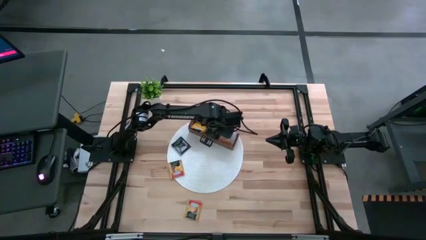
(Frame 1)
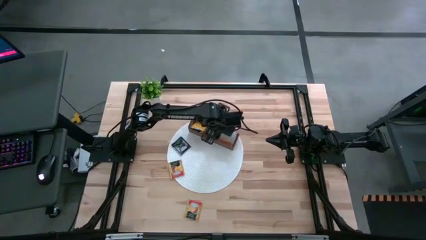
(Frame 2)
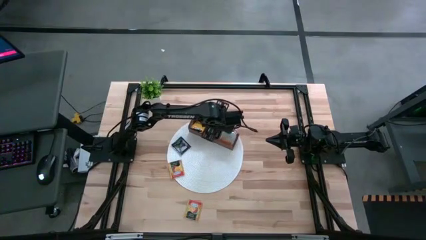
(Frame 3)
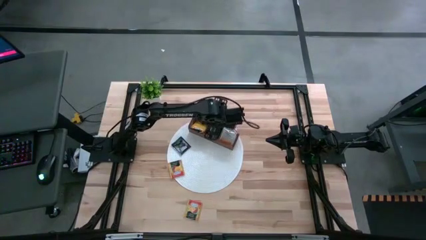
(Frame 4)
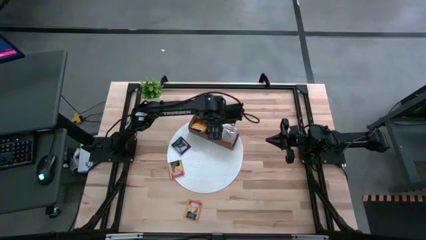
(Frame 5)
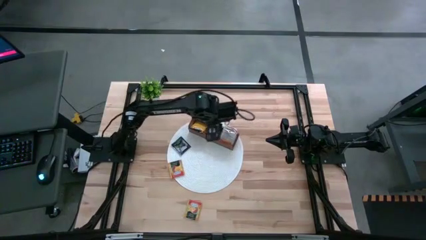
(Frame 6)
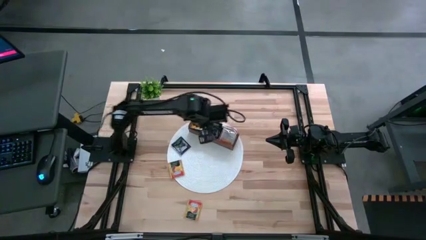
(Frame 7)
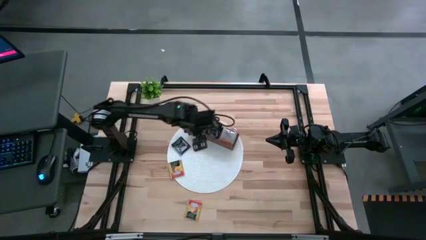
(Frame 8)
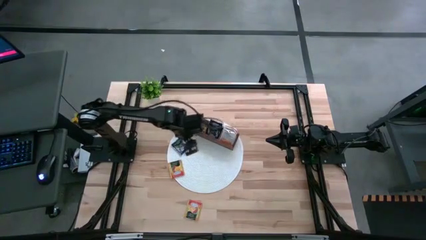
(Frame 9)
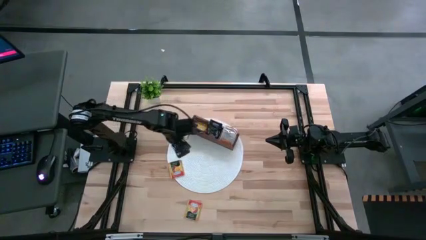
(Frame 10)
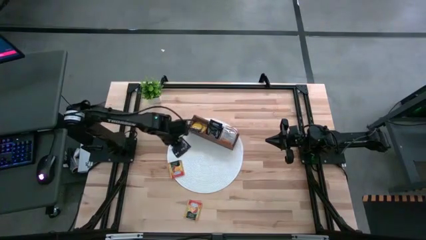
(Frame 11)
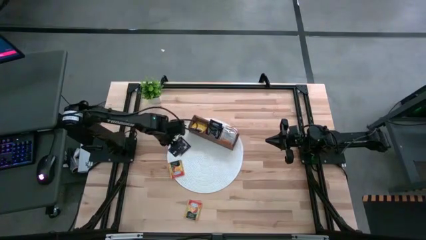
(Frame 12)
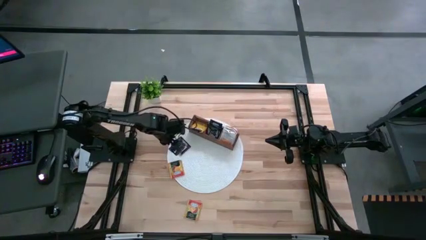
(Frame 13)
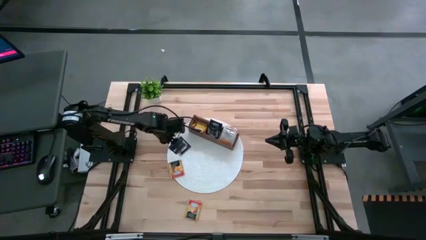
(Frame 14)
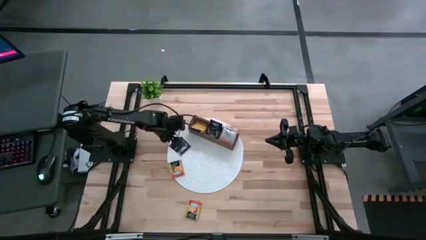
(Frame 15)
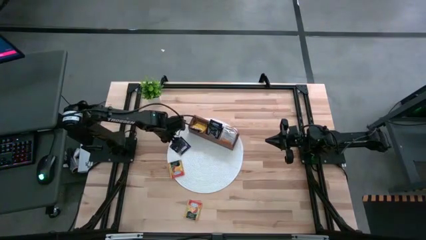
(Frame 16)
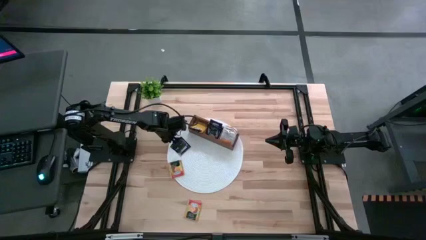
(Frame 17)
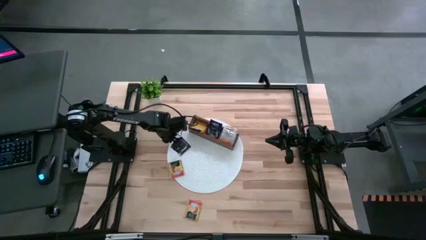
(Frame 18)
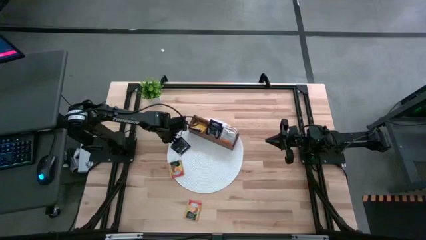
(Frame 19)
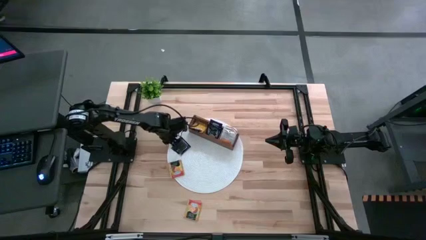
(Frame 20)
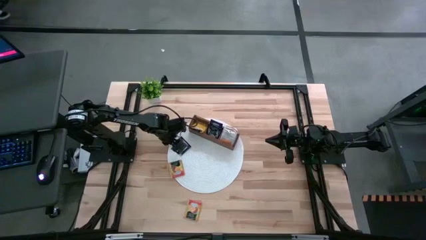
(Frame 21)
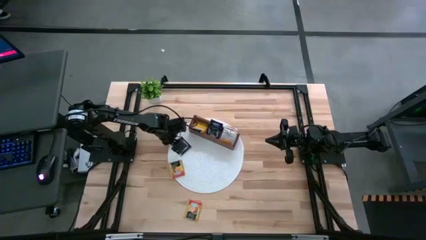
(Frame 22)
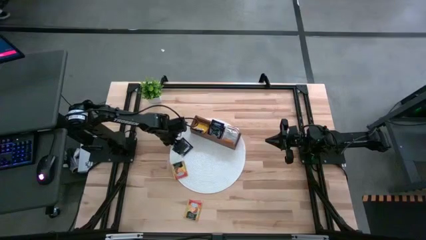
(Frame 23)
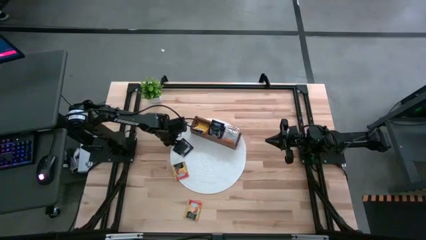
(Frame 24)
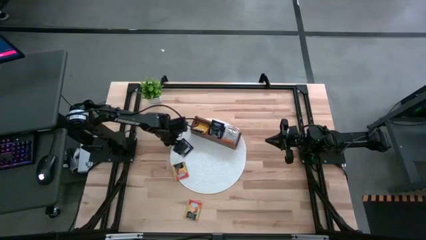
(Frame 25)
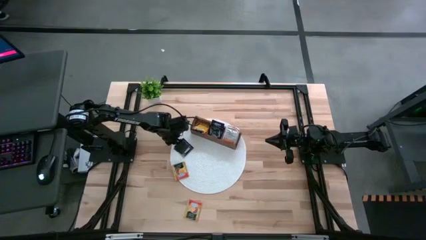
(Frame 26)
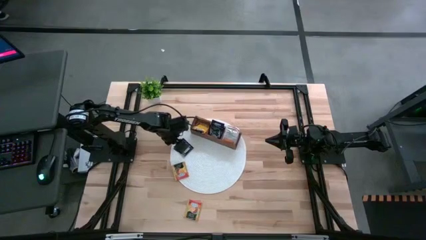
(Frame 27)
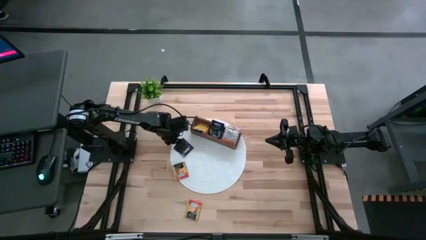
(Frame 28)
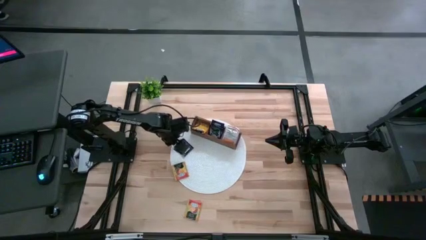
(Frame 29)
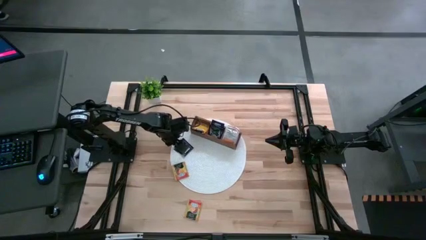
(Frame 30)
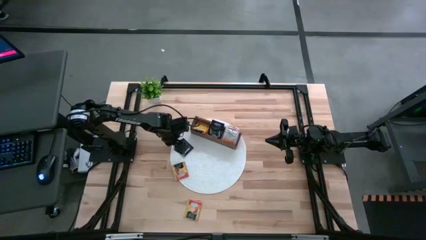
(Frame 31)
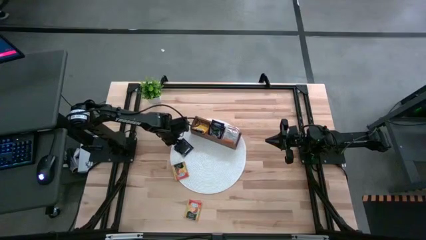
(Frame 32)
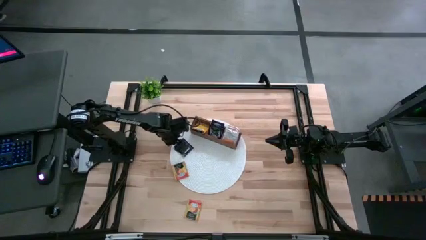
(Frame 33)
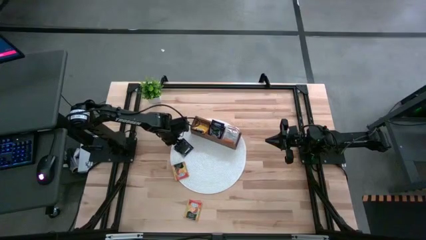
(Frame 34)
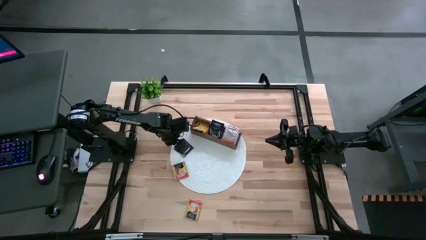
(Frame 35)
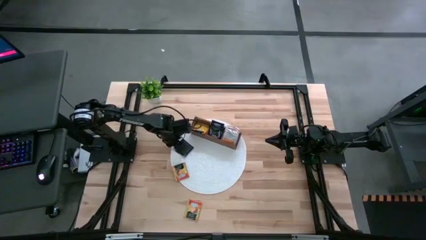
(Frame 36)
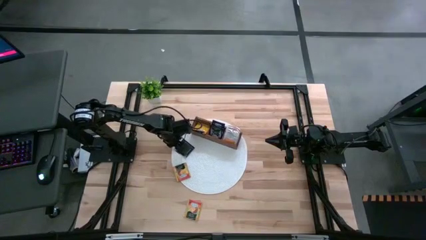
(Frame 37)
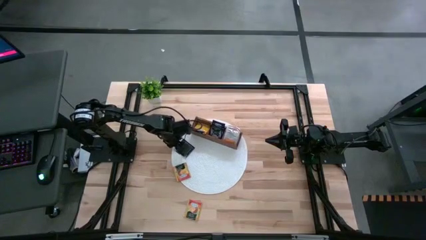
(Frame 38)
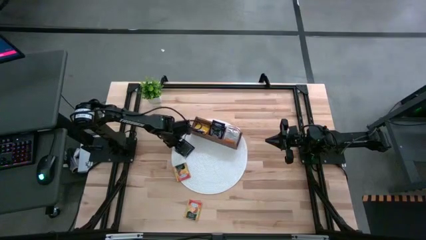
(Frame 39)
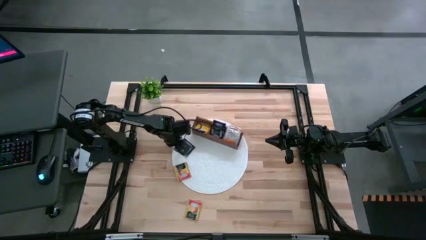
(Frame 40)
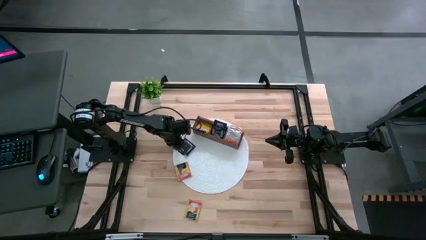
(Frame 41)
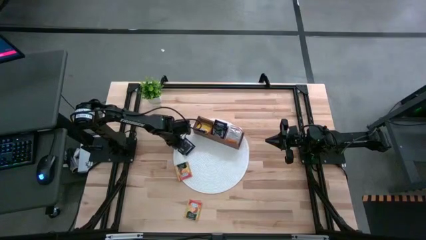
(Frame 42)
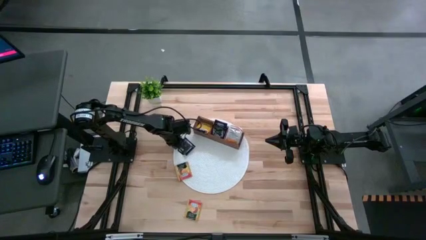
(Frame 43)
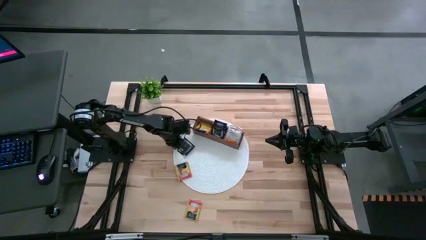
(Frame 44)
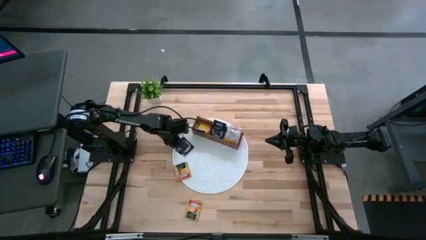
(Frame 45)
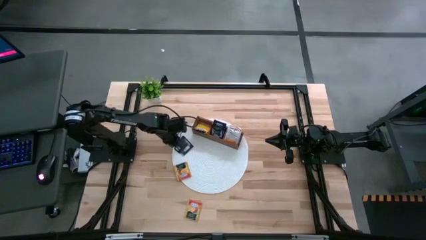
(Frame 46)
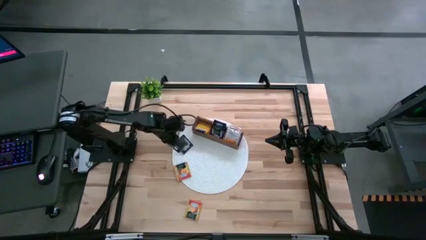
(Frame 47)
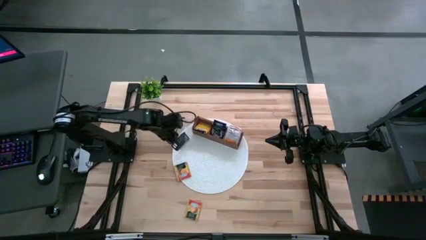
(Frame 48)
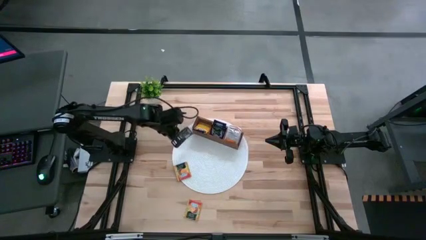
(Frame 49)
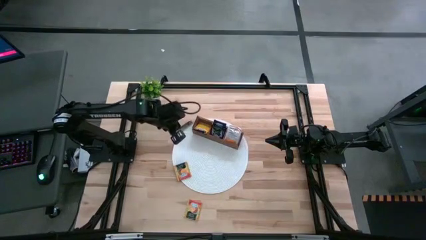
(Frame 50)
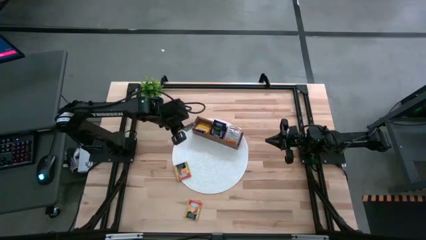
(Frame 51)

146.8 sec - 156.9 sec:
Task: Pick & Place Tea
Put the blue tea bag into the middle section of the wooden organizer
